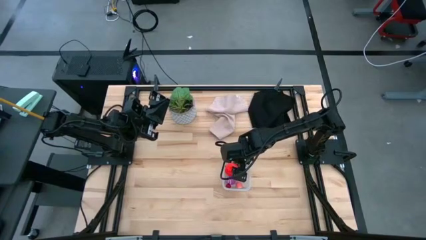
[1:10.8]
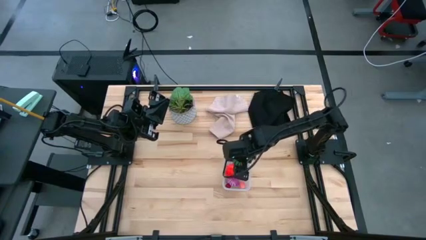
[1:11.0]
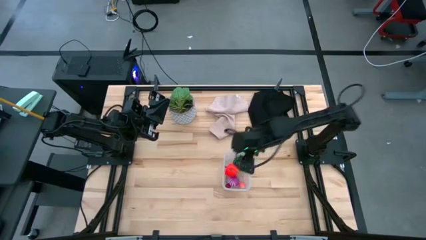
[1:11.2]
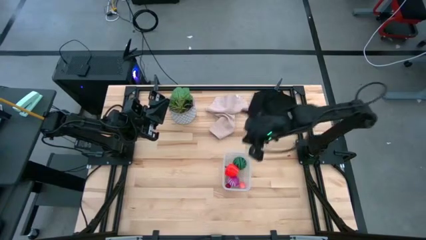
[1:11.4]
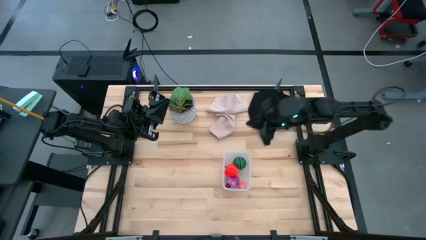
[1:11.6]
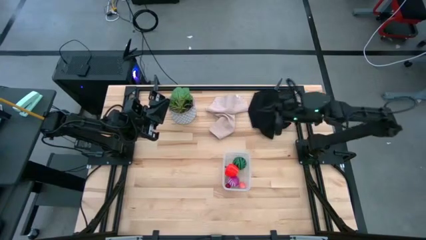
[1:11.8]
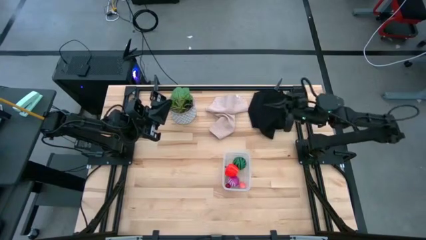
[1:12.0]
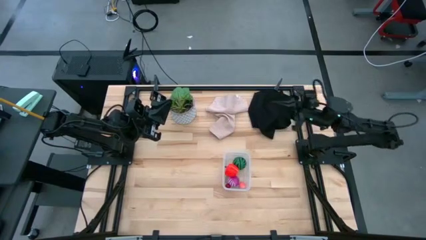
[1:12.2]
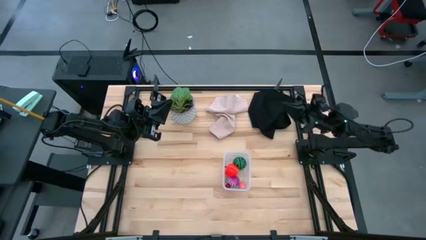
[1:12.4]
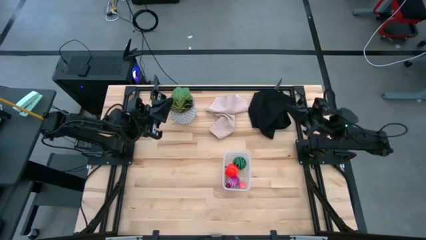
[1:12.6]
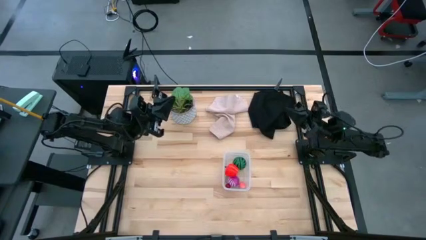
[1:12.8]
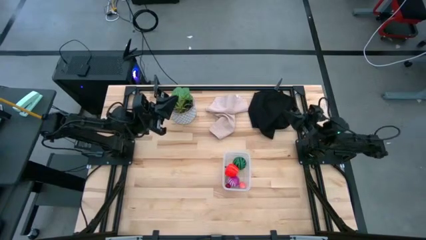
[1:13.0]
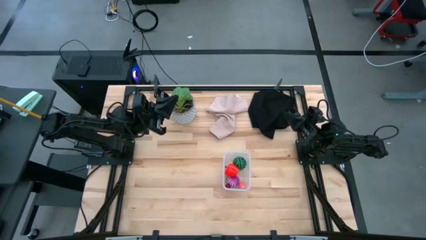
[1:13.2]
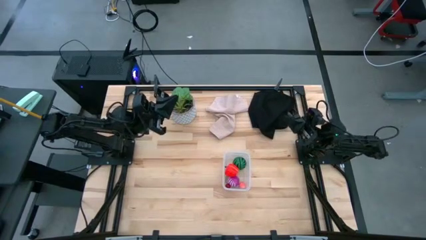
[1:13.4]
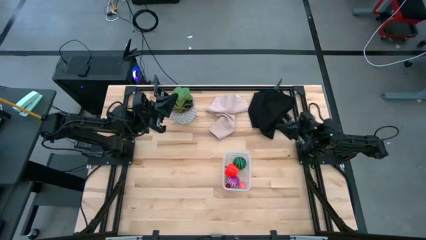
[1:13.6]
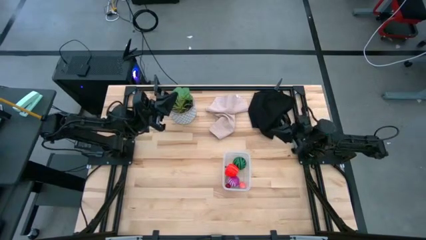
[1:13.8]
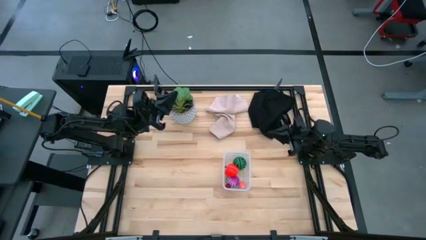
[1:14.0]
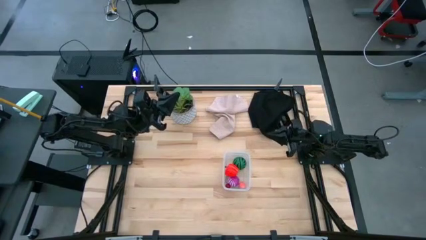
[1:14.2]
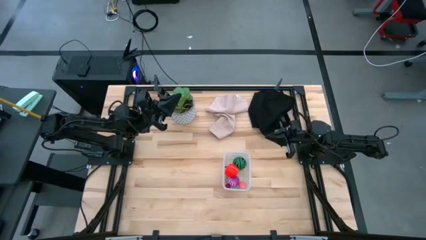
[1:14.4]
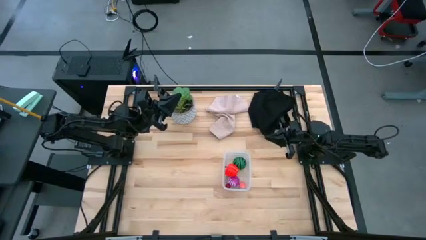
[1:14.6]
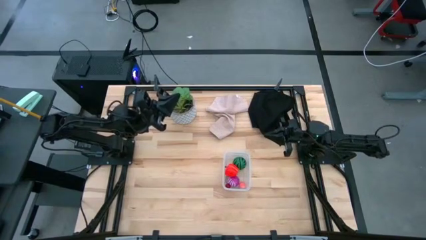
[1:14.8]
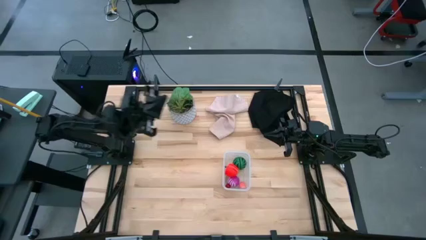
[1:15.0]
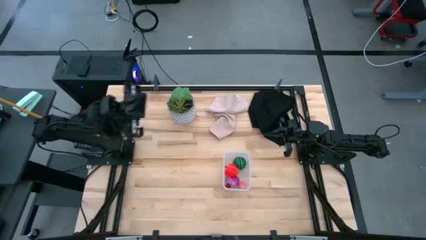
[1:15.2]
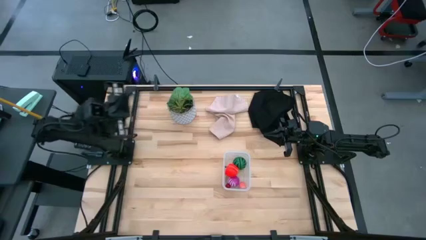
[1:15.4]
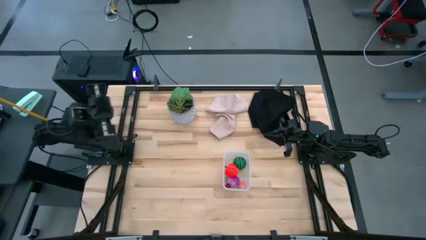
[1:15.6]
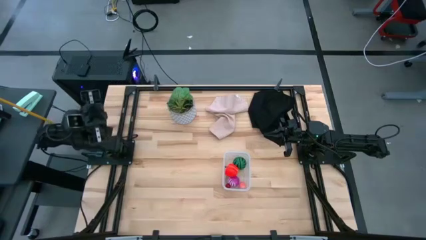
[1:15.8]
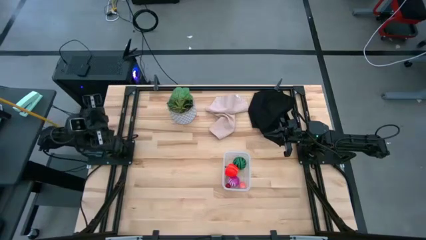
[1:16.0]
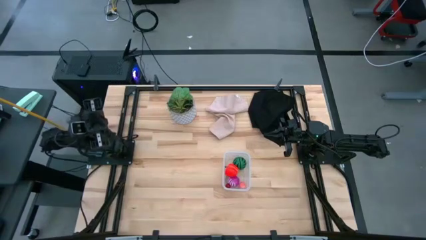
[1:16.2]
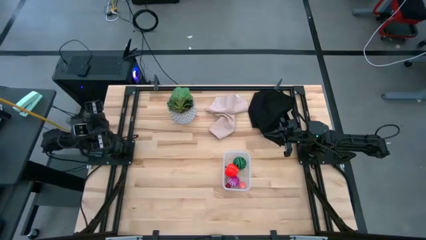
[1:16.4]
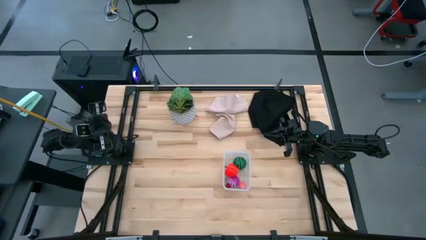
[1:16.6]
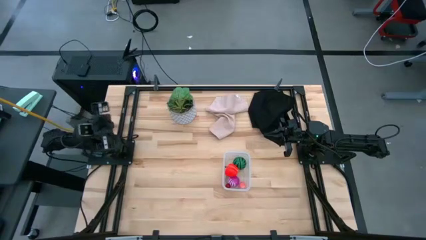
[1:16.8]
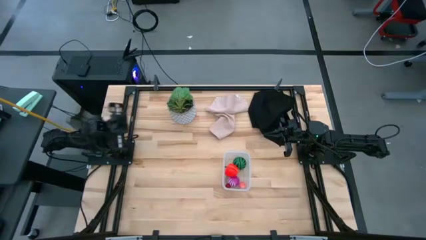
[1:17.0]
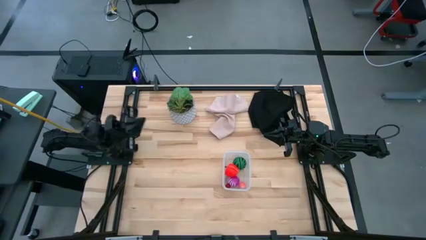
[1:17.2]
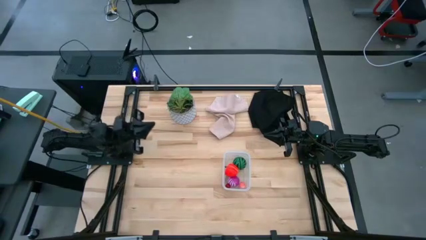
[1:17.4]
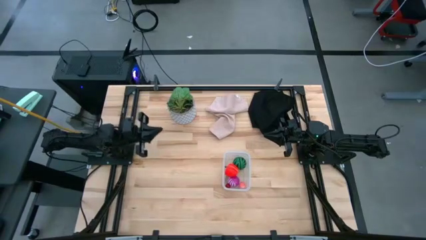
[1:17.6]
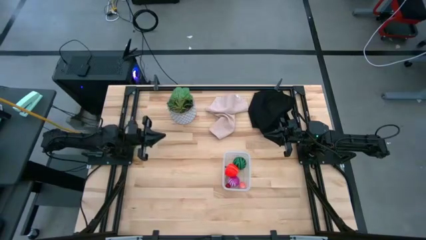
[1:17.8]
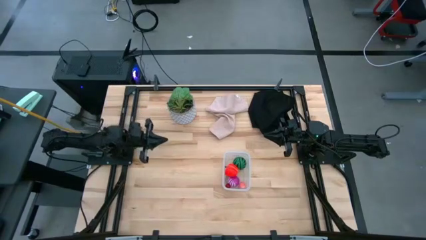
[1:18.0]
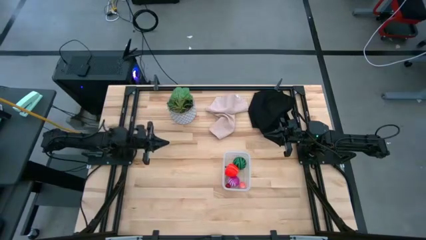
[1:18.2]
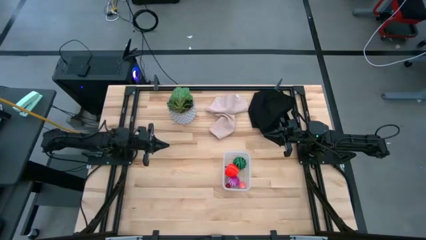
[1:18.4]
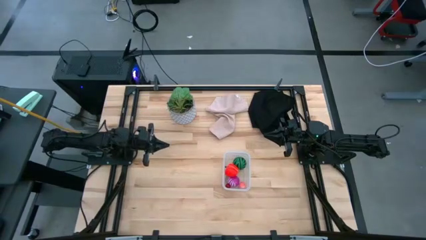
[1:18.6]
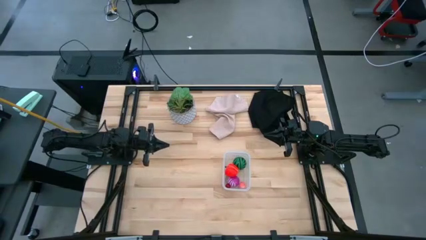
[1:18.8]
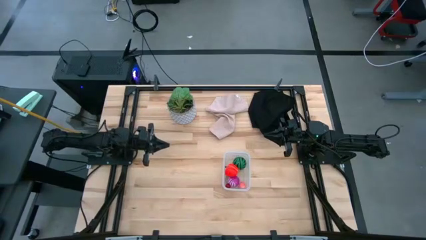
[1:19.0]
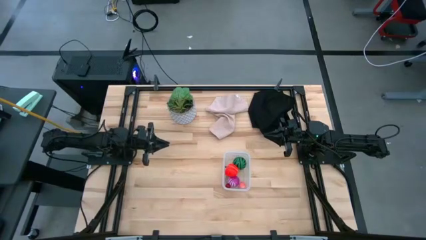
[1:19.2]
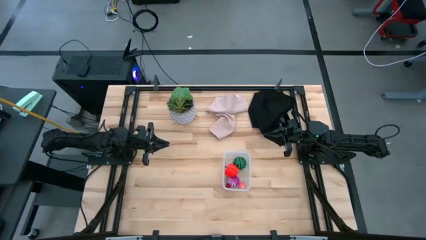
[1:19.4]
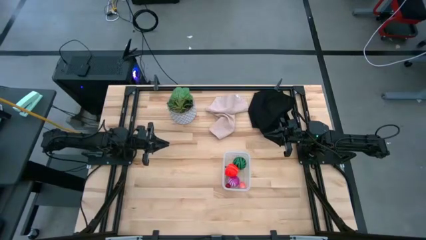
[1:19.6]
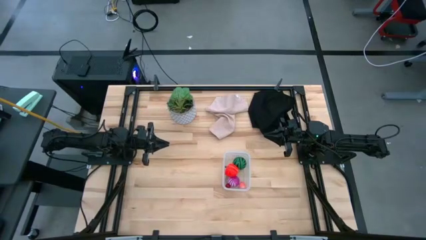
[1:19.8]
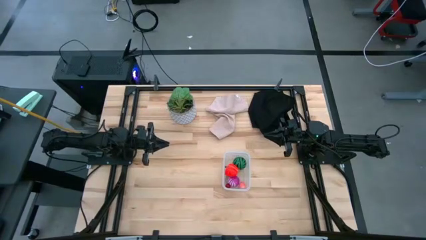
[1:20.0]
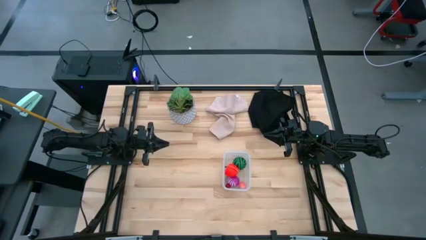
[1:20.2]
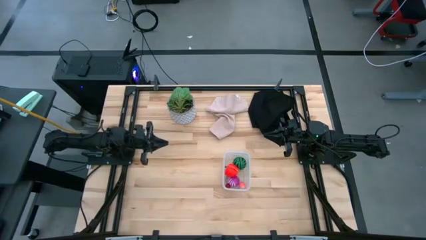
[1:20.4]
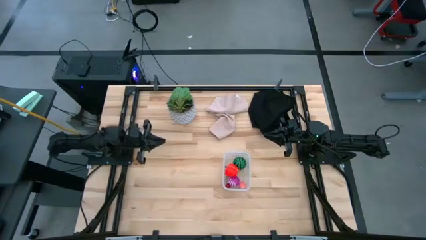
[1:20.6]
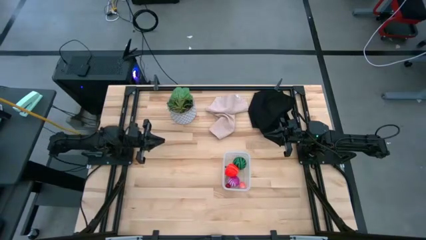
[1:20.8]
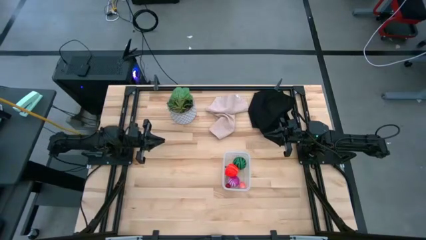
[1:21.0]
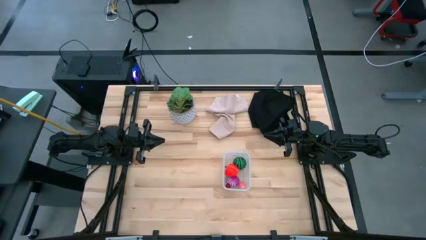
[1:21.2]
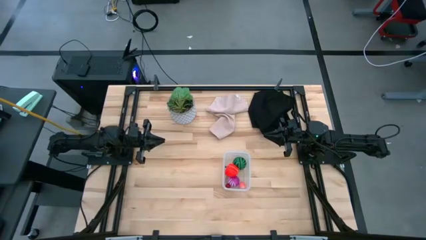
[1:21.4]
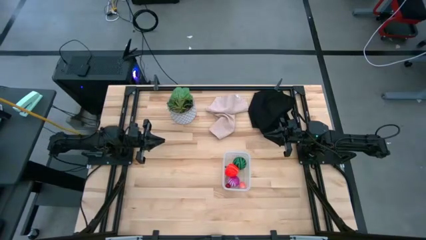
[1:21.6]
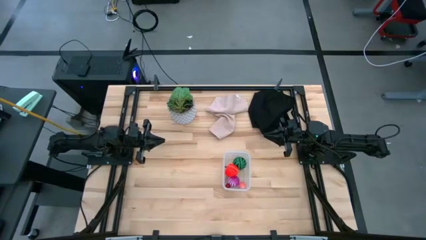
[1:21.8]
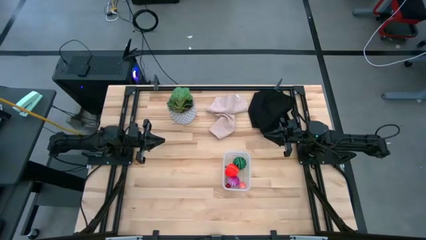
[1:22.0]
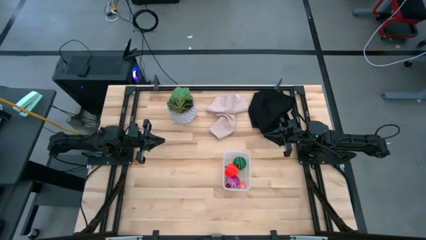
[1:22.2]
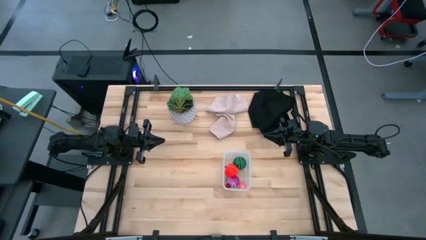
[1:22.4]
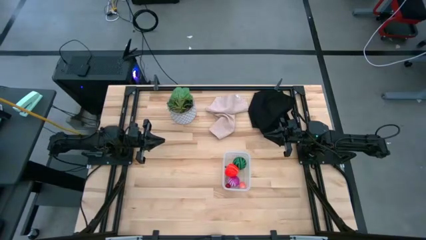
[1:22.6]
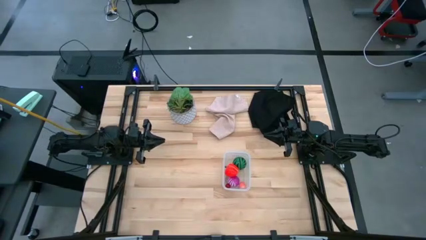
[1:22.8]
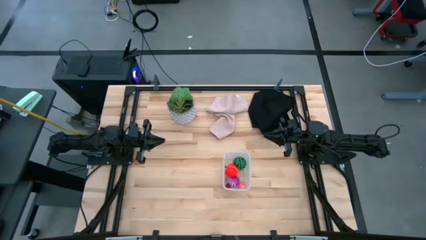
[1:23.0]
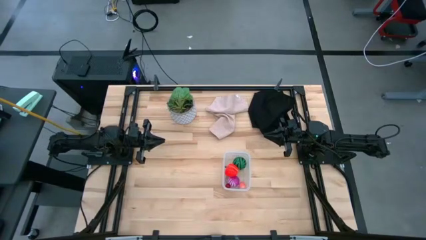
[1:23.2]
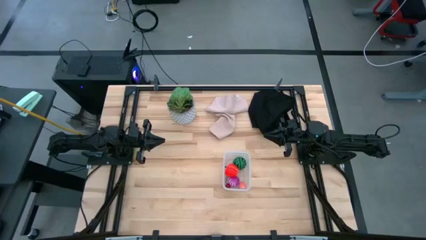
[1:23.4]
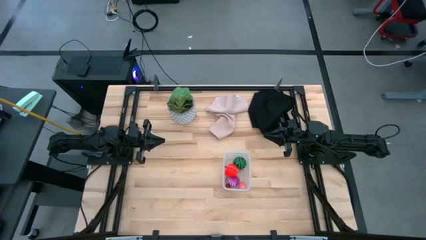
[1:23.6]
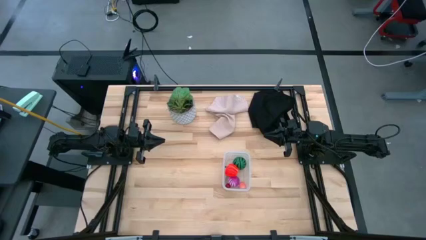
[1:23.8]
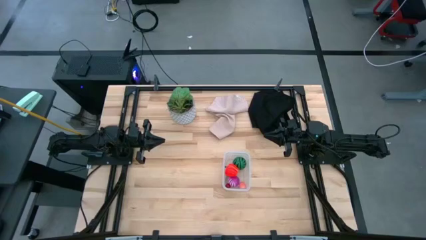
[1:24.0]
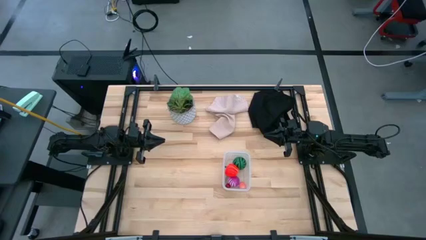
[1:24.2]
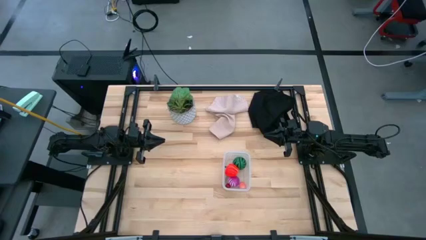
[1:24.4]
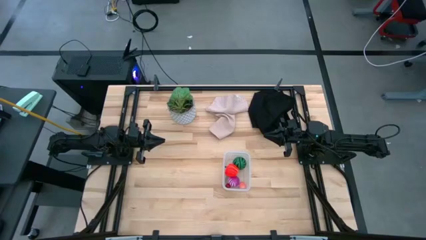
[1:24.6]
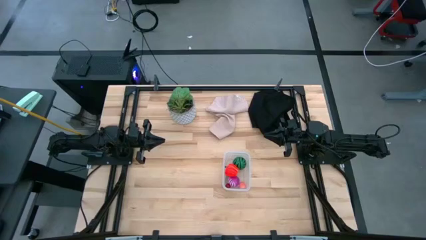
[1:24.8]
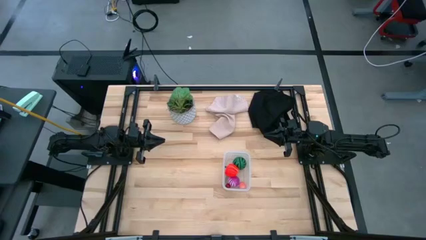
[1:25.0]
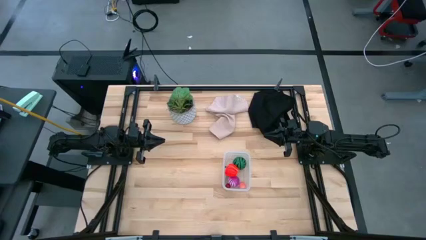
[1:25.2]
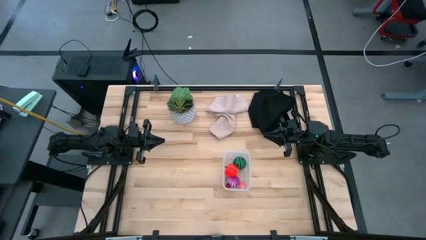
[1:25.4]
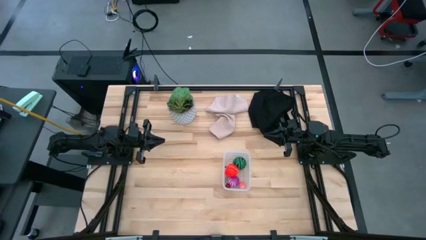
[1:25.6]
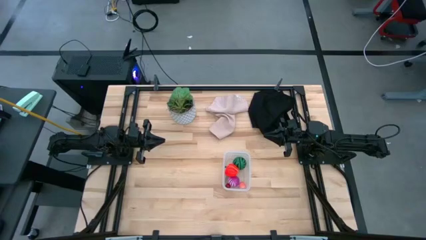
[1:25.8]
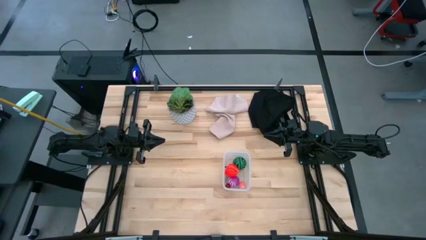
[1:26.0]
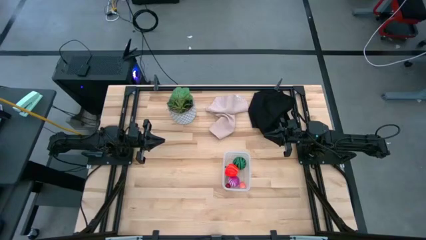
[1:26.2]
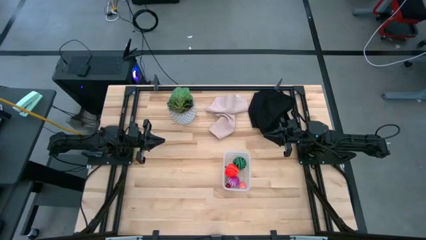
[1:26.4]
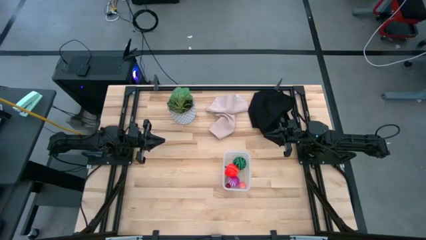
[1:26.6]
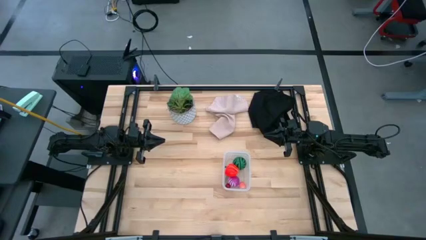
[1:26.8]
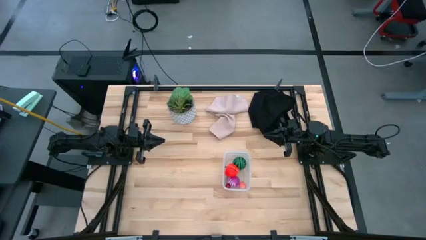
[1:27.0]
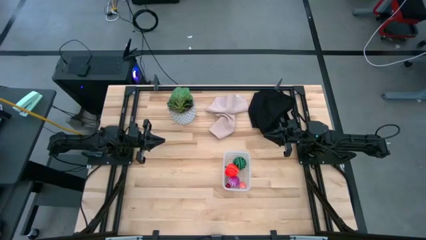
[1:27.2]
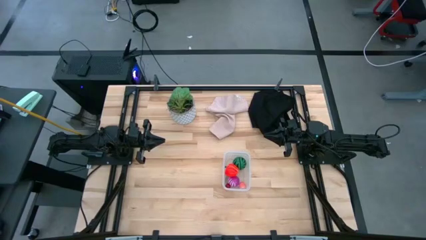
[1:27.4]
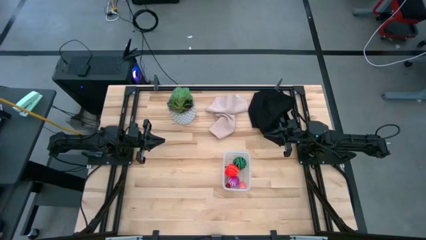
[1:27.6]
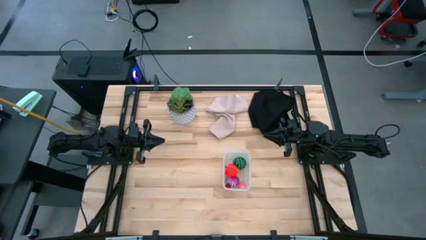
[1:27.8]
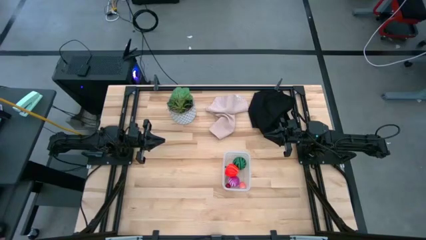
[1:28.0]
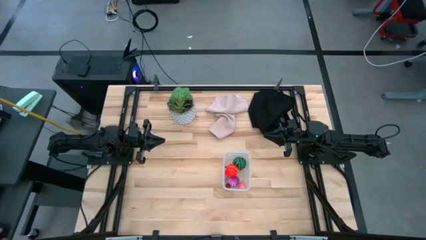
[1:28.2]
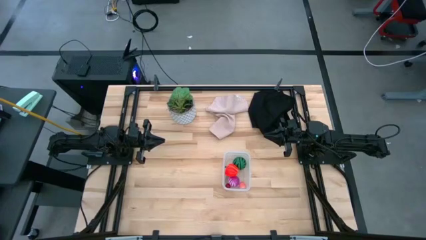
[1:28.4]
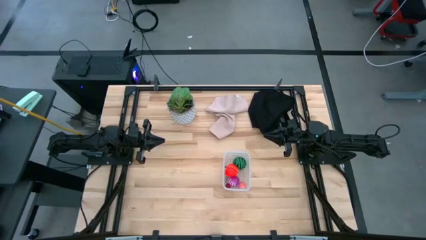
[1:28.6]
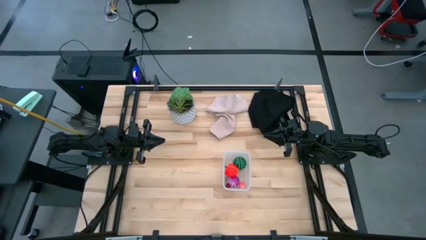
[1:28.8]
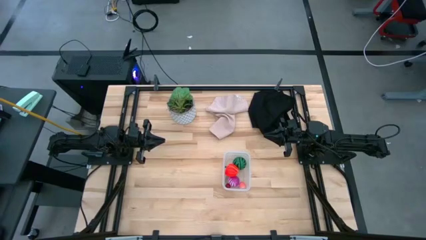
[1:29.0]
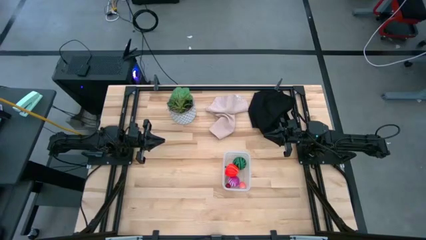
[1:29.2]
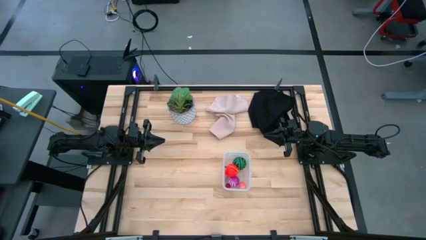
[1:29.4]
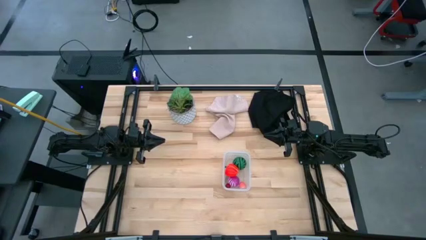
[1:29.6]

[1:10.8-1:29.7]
Task: Pick and placing Produce into tupperware
Return to Home Position
